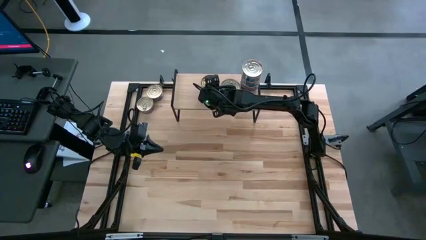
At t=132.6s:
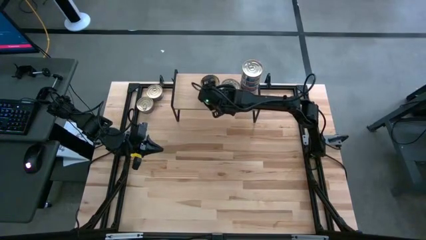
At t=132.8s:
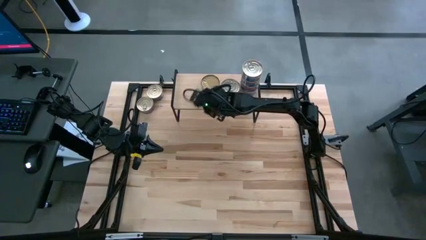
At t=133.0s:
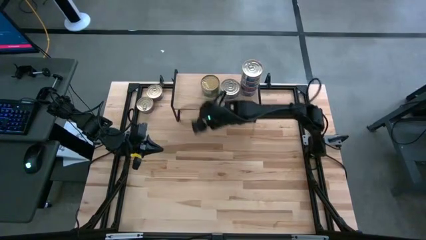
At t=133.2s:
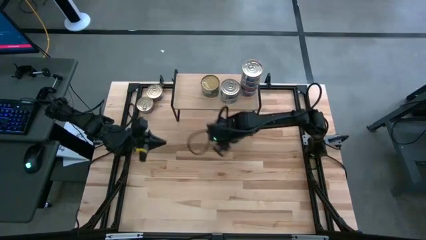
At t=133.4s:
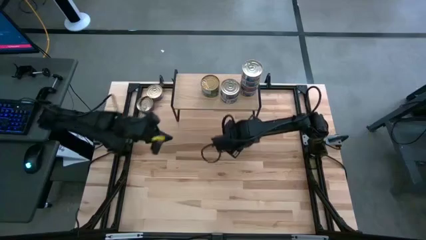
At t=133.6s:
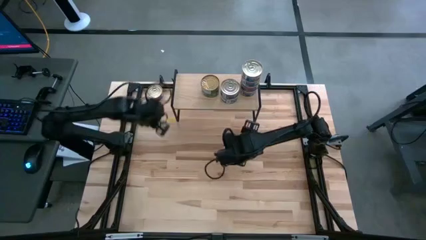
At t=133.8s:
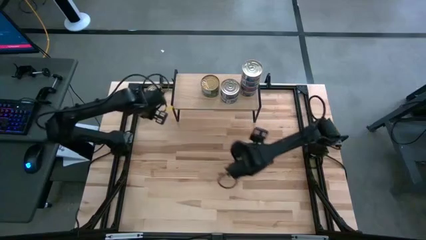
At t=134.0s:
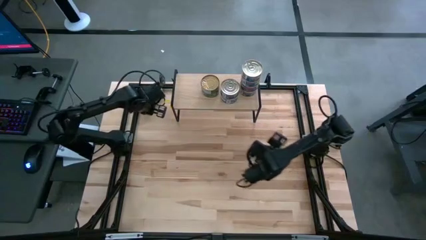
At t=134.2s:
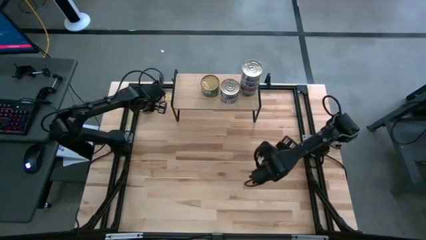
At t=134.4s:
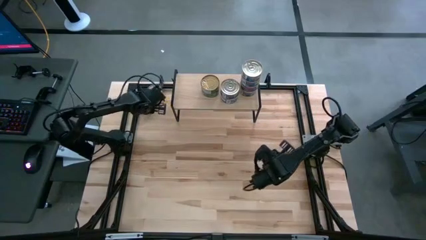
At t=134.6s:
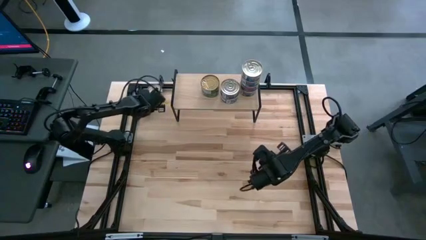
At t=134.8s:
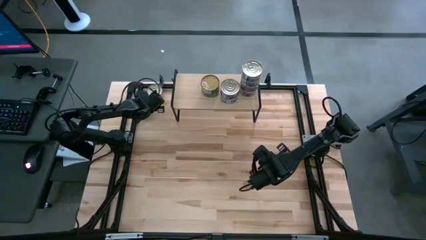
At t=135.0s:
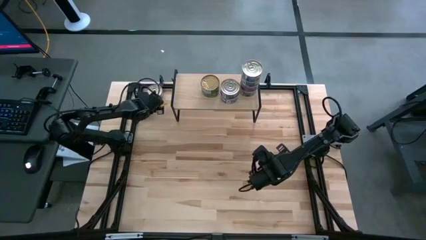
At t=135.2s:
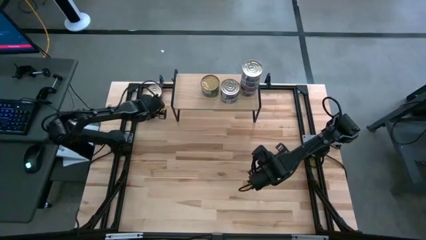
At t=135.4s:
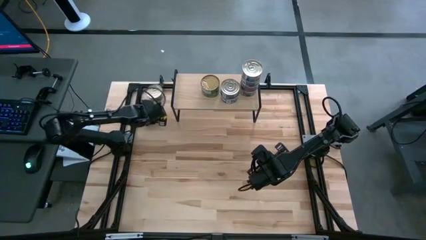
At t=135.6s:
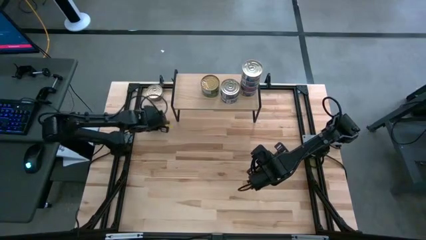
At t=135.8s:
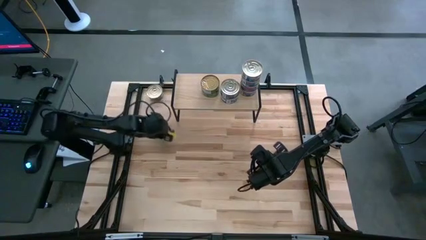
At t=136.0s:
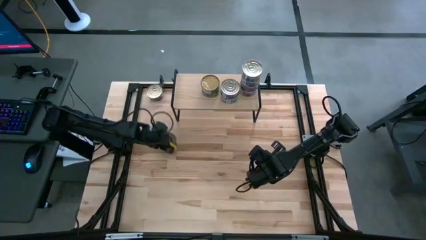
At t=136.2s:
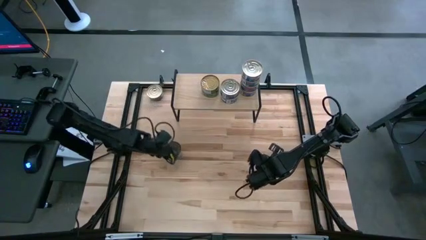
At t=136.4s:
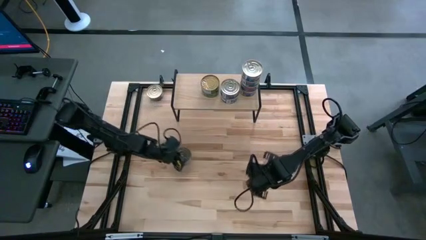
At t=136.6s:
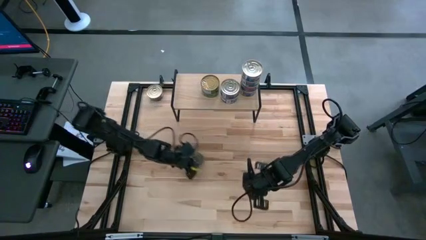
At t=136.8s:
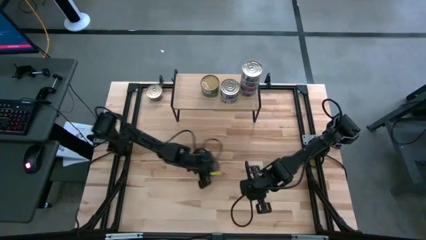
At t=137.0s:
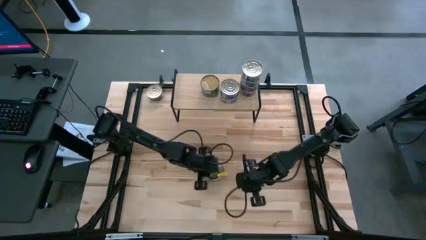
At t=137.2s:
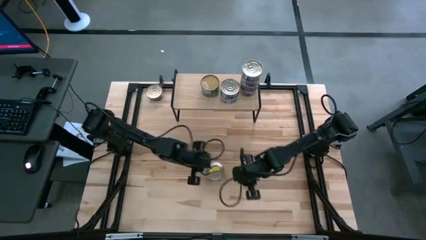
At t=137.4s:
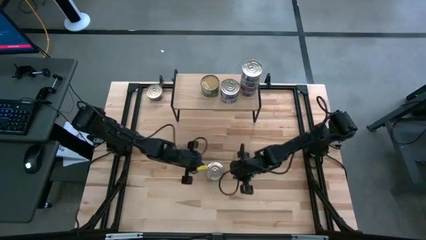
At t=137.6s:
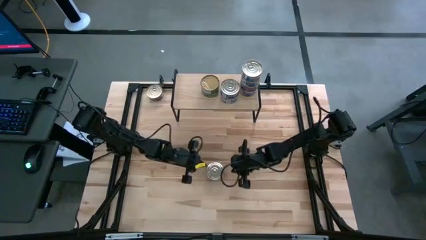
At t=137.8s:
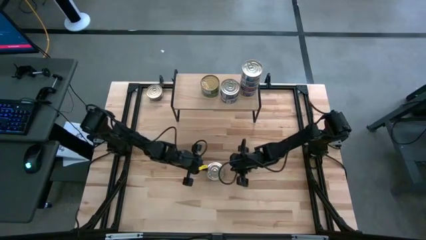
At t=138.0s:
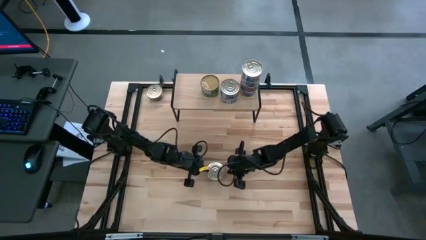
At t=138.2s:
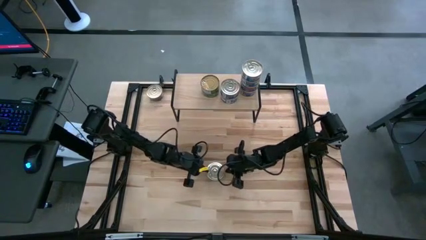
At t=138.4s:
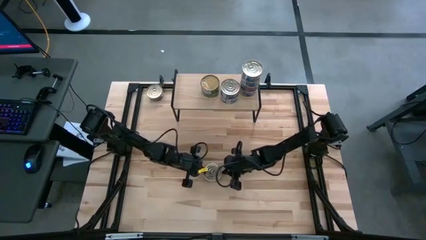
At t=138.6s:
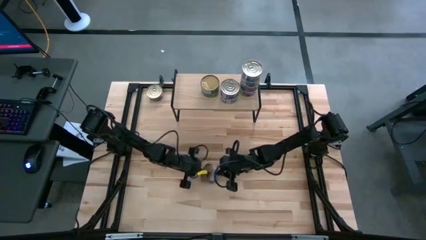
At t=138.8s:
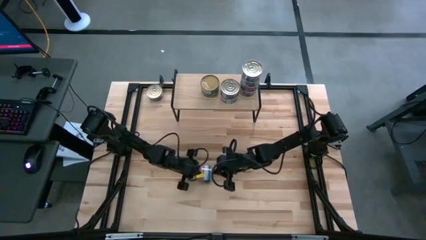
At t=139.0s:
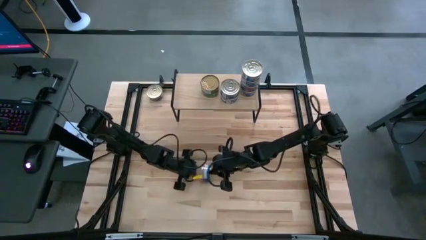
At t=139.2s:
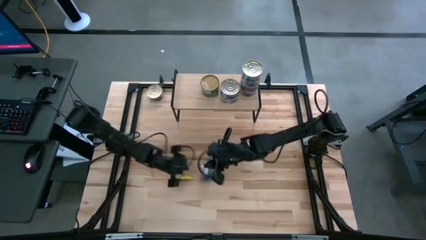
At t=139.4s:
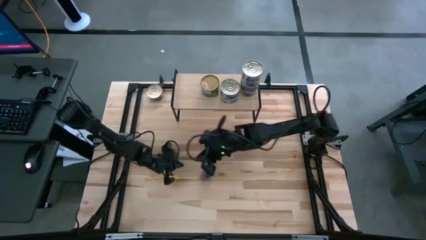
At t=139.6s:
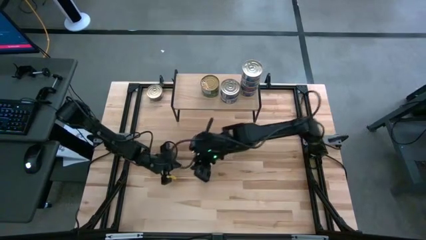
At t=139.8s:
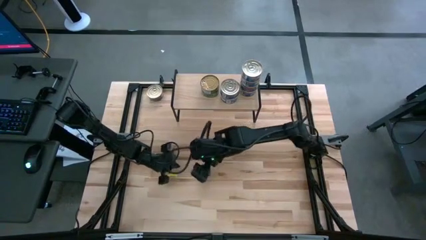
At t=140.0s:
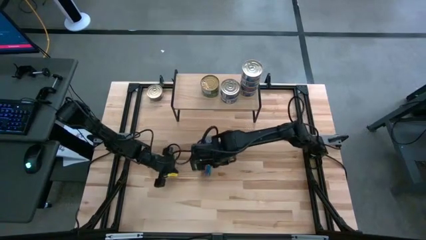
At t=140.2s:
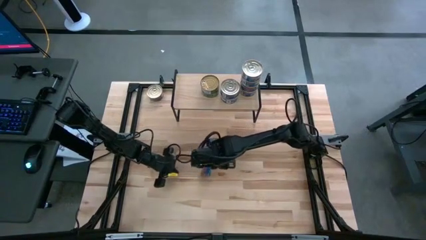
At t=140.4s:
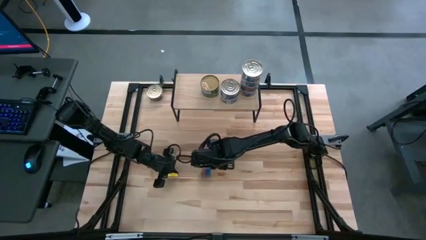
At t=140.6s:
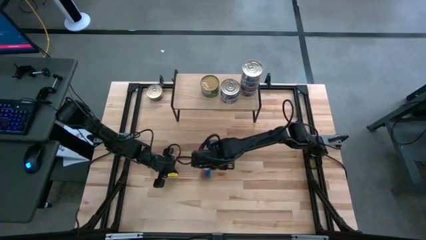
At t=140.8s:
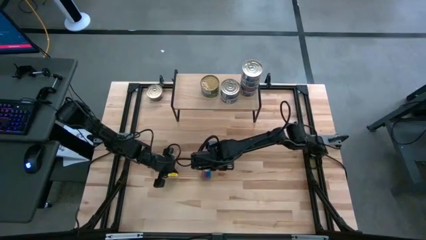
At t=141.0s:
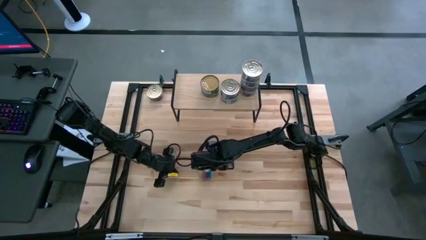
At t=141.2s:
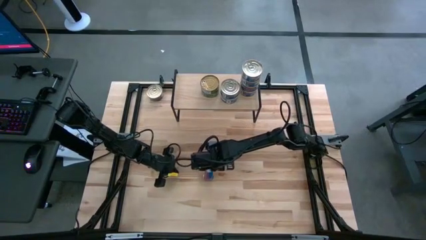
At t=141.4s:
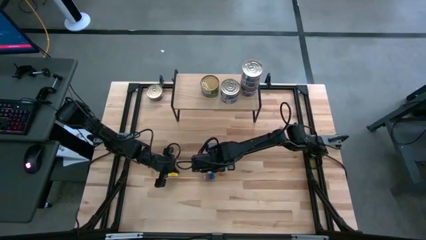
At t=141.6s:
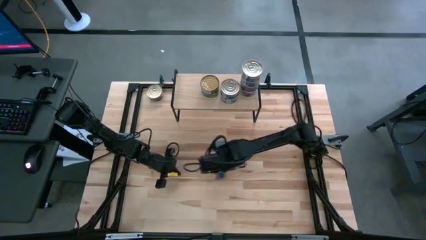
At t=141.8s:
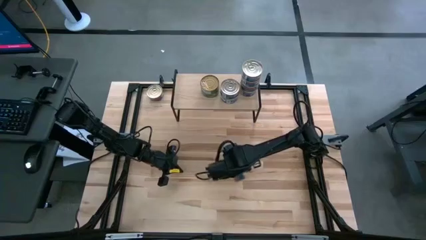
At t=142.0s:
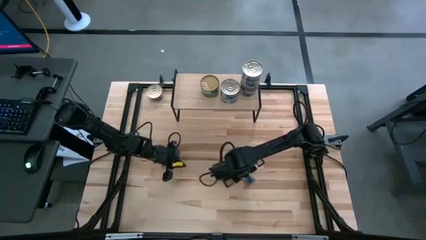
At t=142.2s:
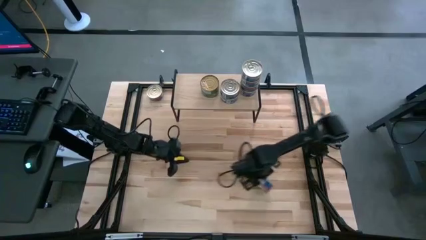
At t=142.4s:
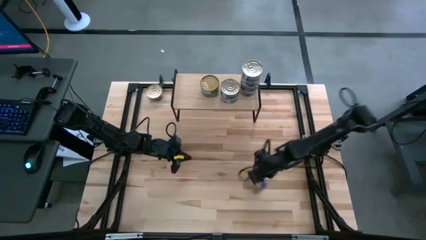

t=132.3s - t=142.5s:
Task: Stack canned seafood by type on shelf
Stack the blue tuna can on top of the other stacked blue tuna cans on the shelf

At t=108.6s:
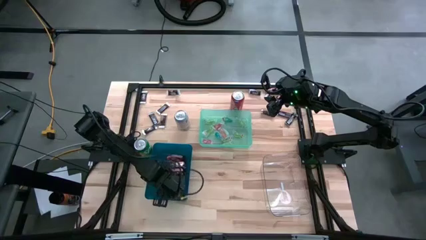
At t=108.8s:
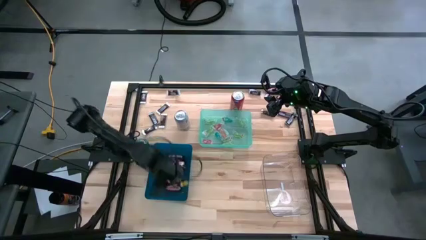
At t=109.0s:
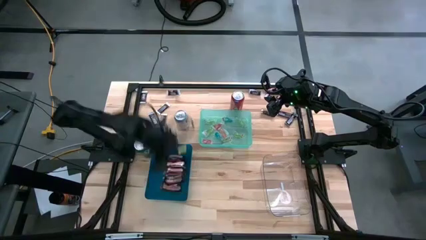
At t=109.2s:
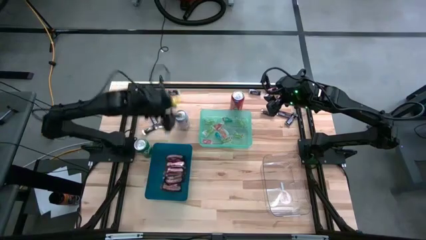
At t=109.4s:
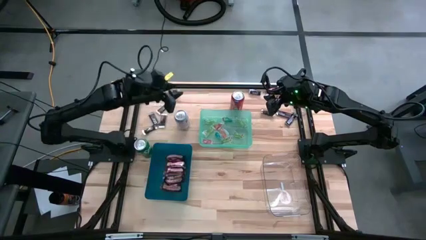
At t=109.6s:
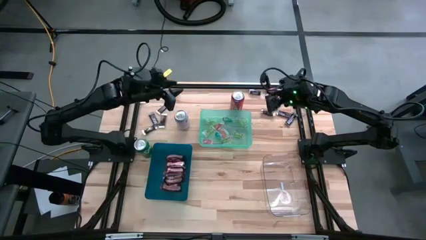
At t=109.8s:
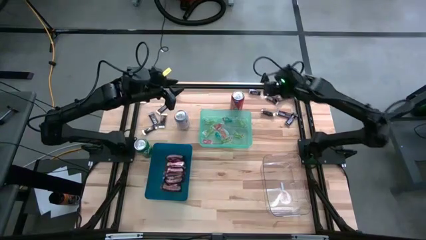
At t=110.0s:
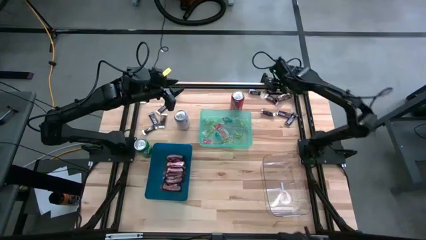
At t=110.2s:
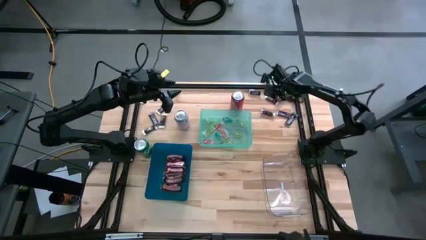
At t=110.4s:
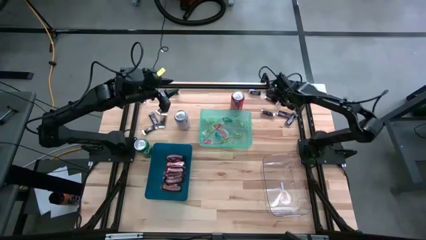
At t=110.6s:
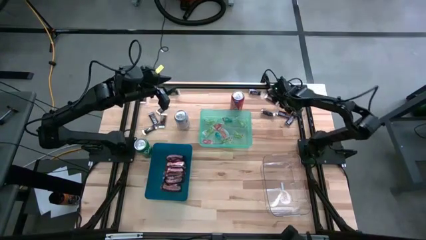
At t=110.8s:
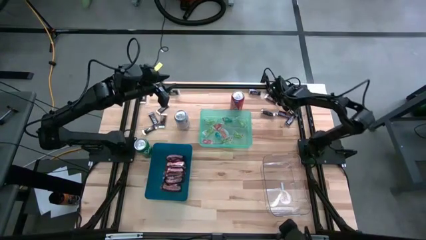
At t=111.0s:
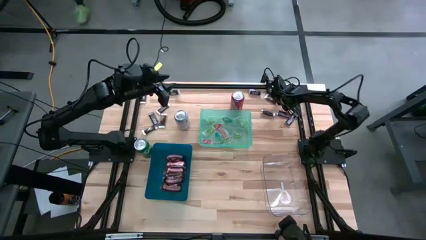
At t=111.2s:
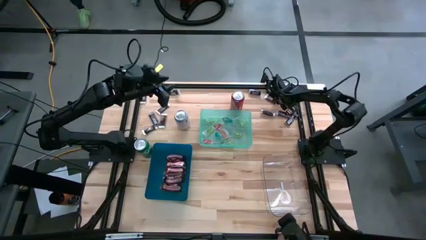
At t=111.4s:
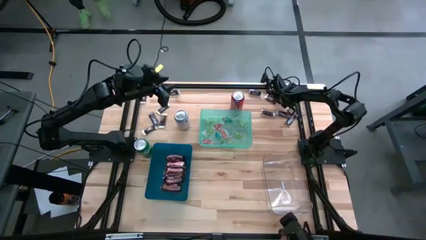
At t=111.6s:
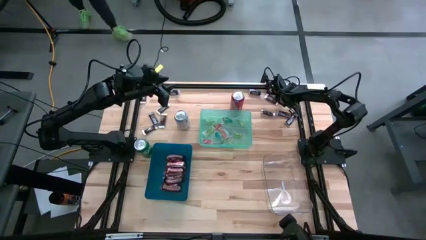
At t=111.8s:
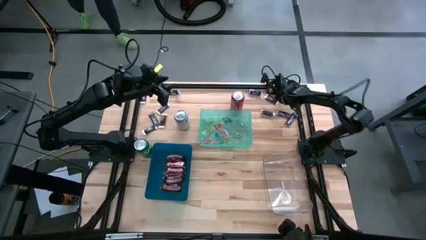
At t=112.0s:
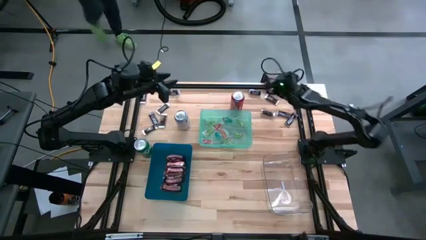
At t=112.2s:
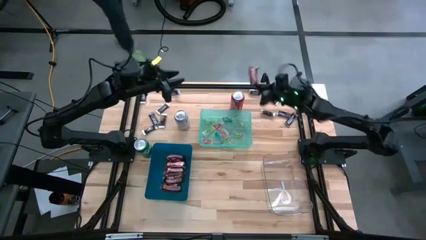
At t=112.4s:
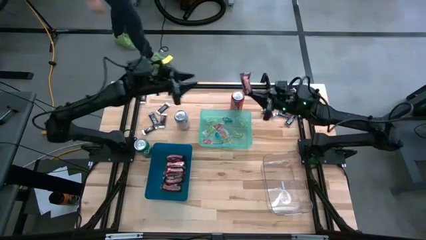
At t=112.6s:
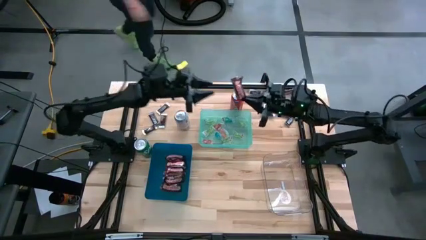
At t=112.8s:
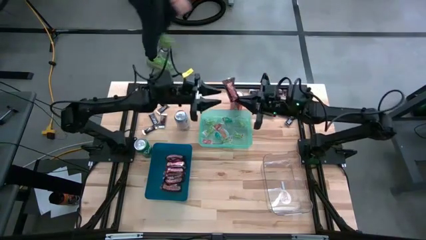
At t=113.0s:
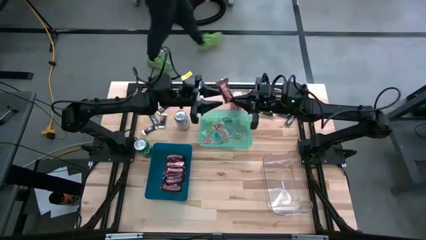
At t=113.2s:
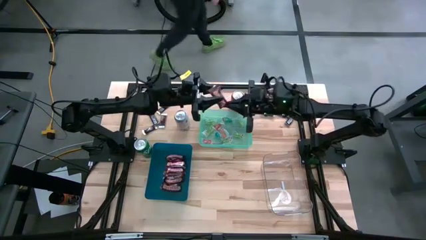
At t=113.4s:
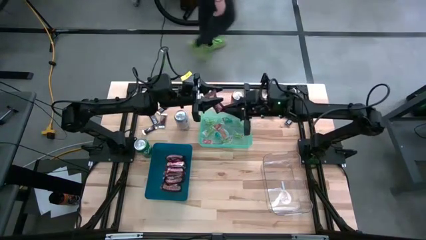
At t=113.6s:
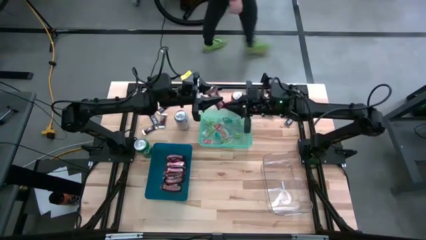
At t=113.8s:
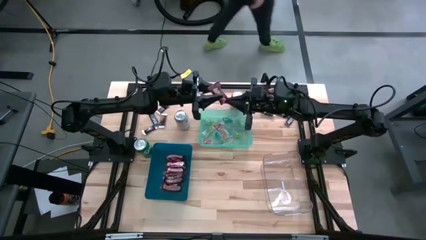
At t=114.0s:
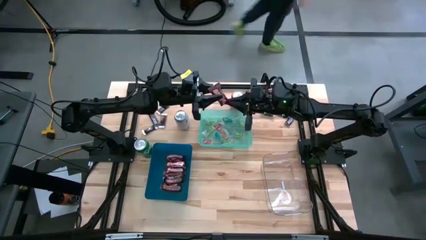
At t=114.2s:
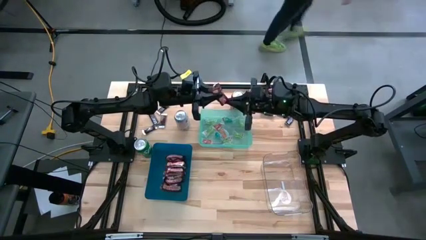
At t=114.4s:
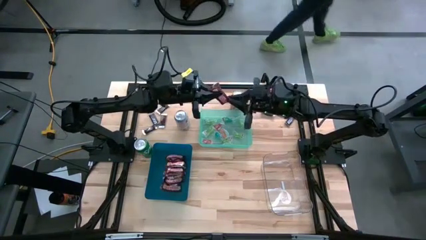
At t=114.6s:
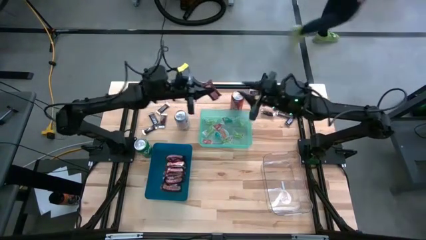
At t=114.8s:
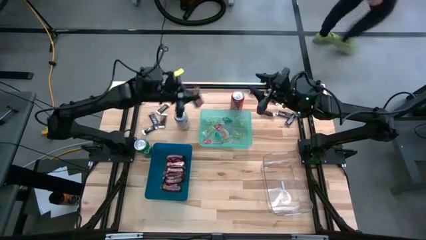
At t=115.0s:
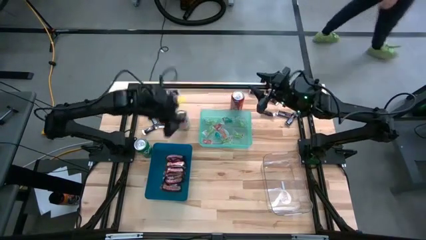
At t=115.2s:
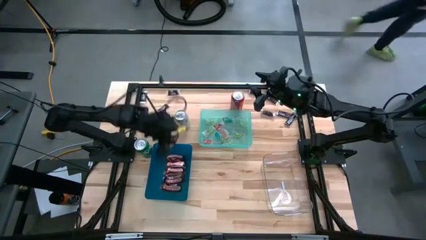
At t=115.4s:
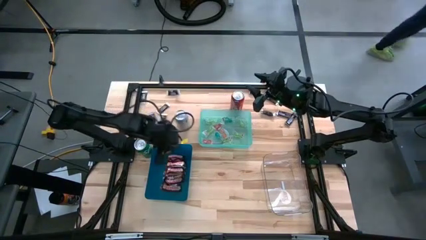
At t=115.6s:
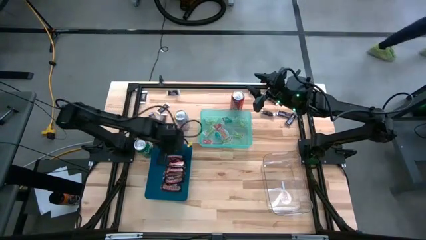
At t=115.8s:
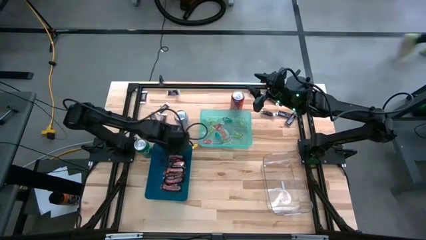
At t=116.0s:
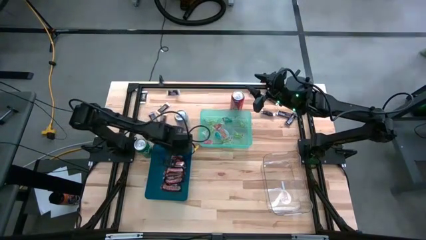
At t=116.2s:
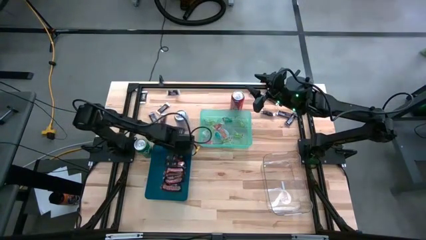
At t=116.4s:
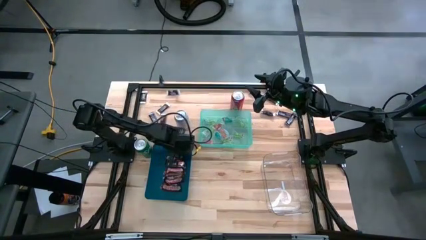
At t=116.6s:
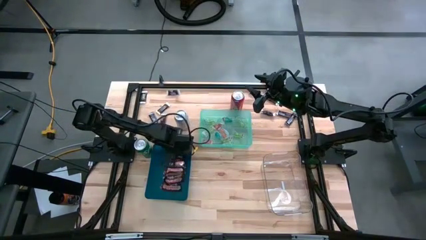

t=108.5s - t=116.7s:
Task: Organize candy in baskets
Put the brown red chocolate into the blue bin
